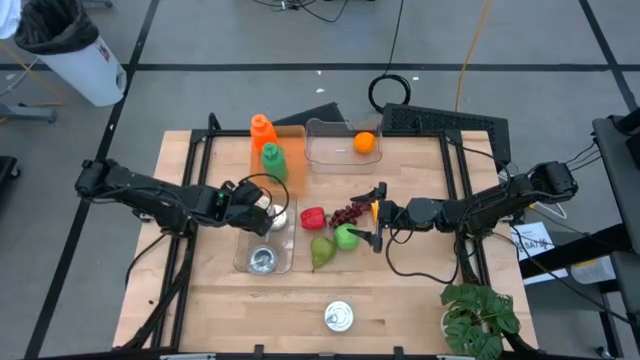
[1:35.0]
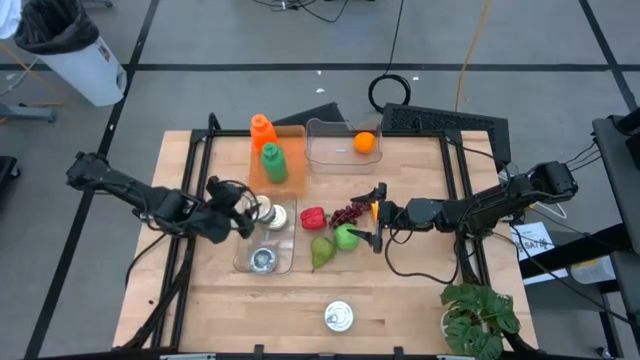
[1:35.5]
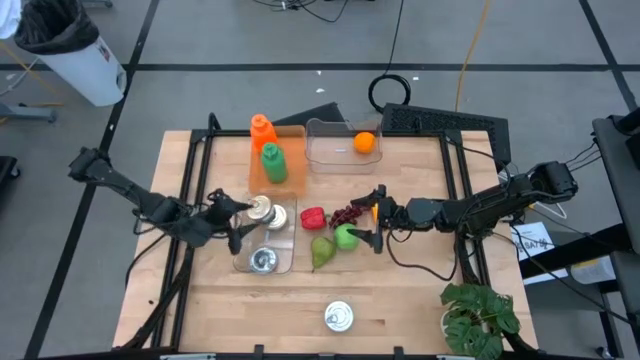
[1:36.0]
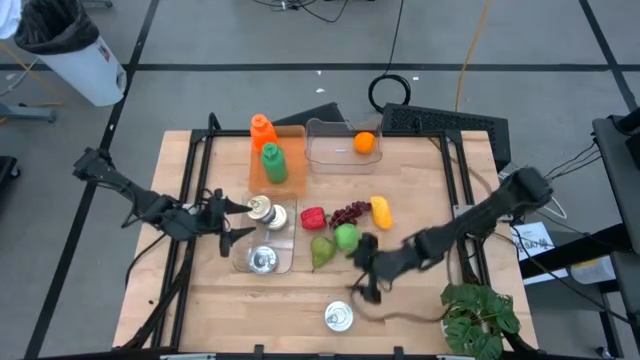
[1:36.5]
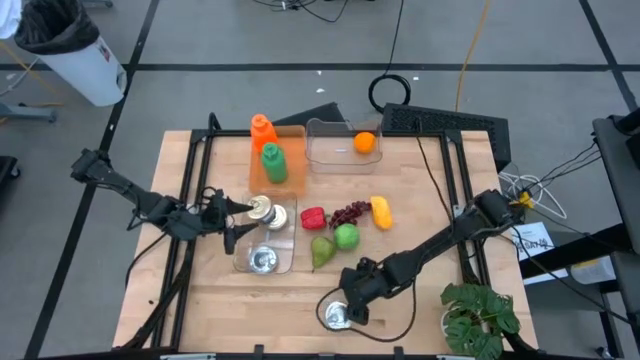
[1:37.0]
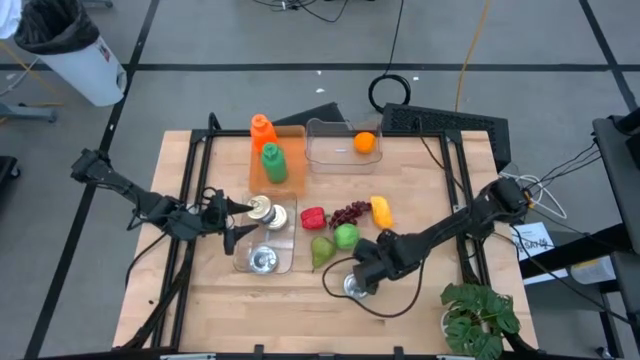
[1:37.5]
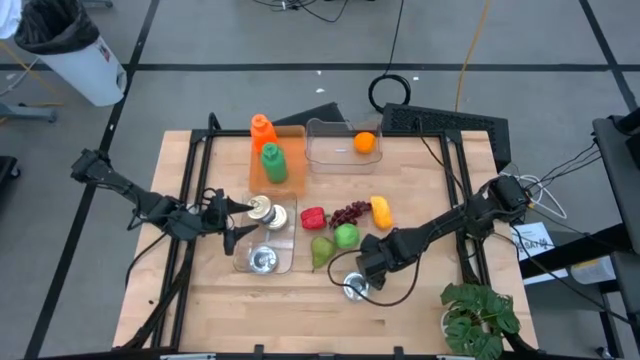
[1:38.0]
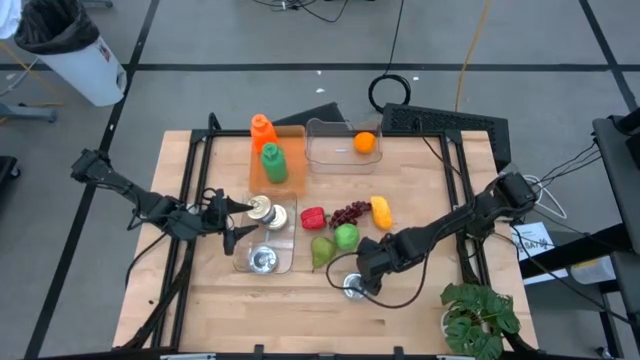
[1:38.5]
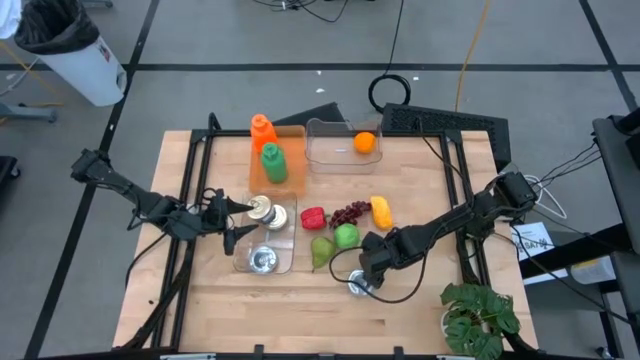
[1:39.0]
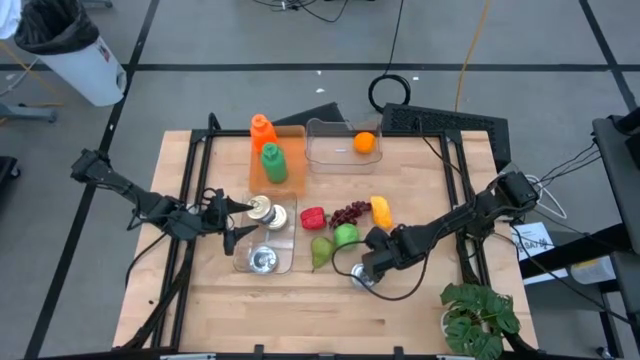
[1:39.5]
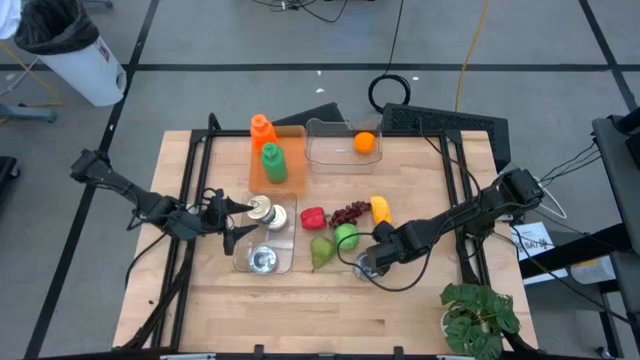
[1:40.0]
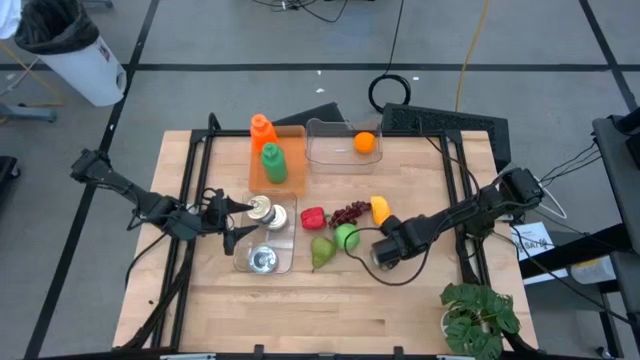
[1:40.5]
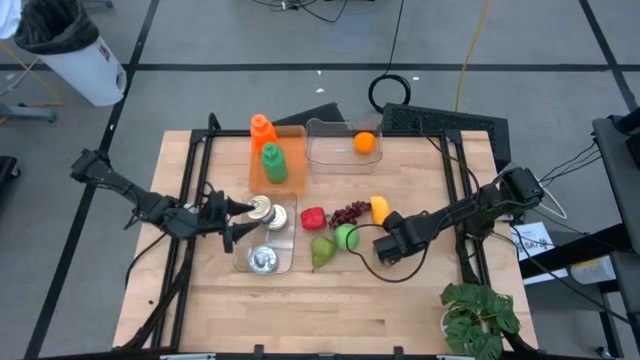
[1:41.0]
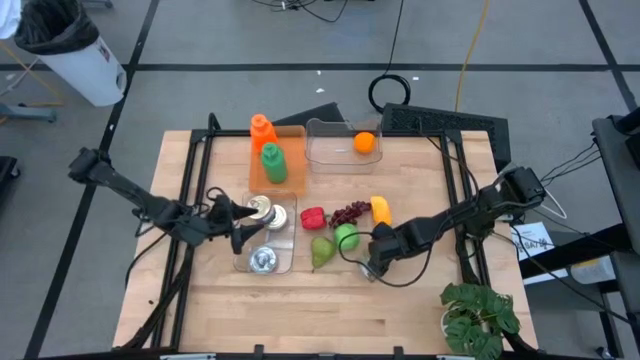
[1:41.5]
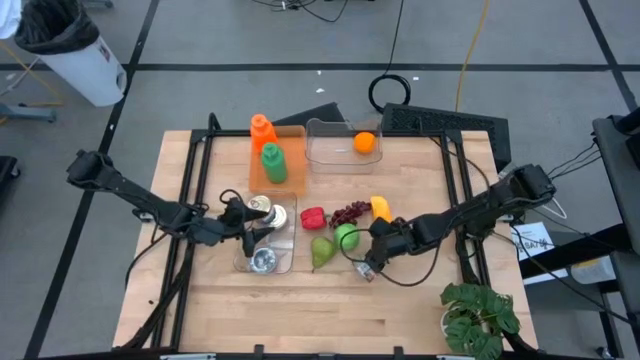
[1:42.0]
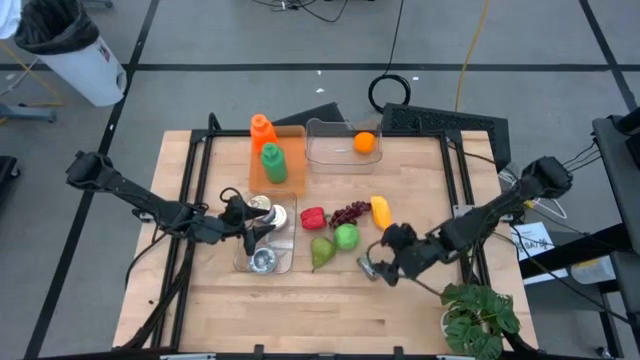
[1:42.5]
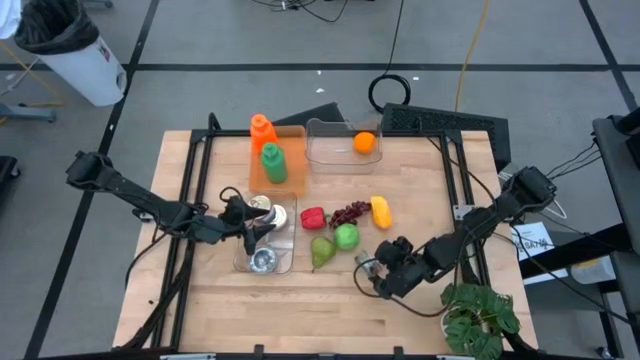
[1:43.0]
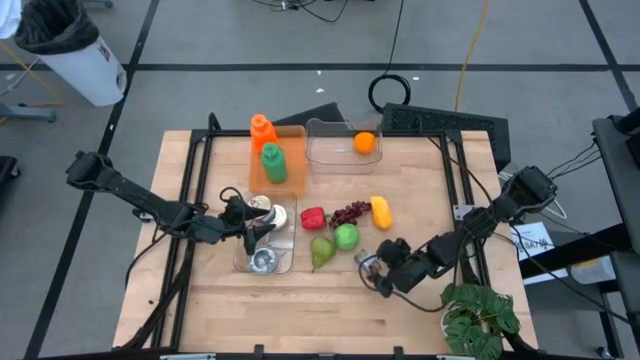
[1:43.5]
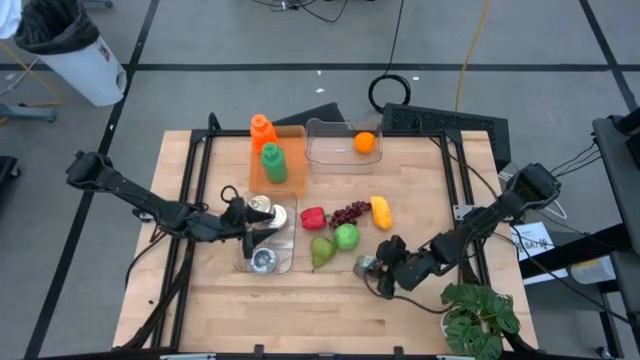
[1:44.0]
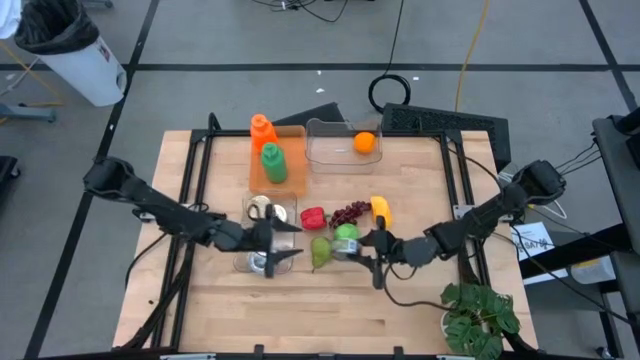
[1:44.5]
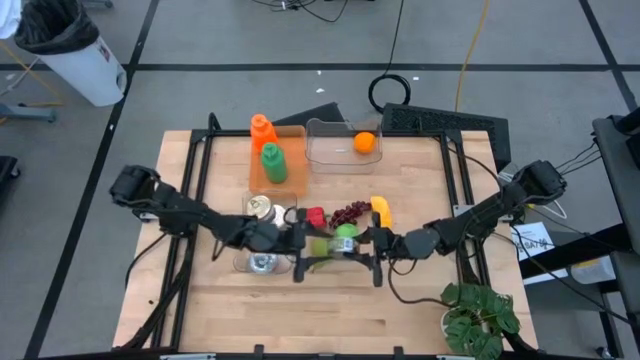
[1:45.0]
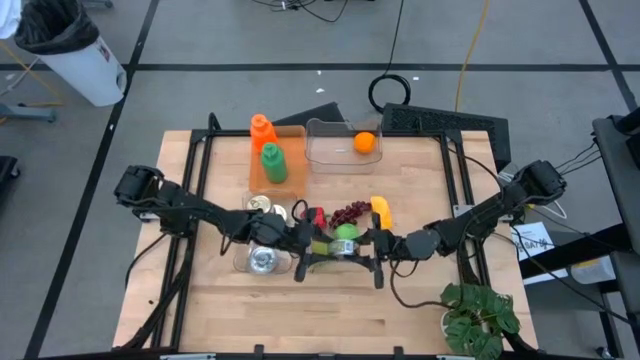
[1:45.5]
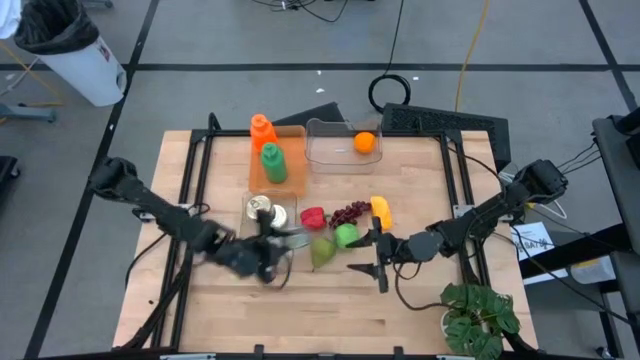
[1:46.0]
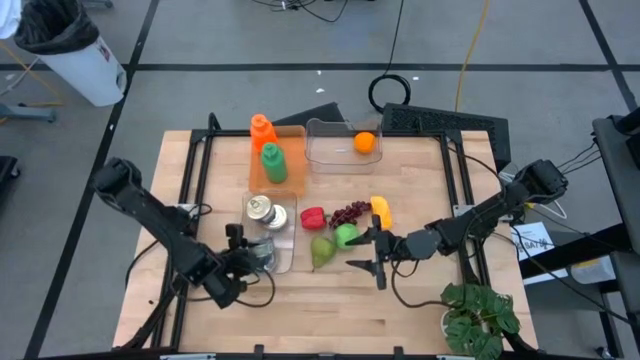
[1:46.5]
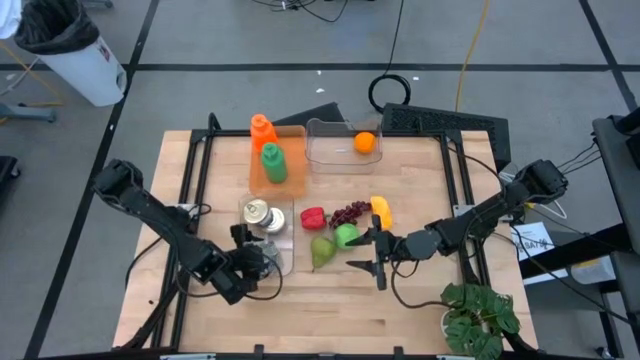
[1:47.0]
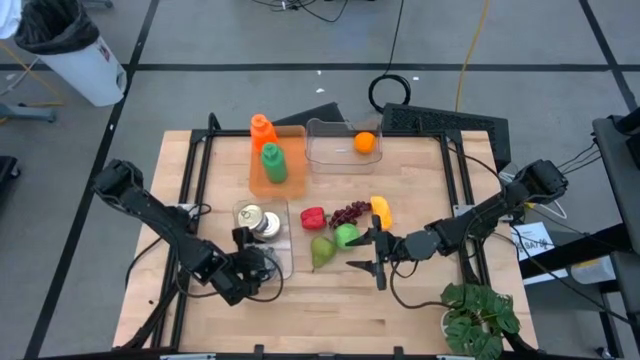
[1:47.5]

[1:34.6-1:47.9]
Task: Pick & Place Food Item
Put the green tuna can into the bottom transparent bin

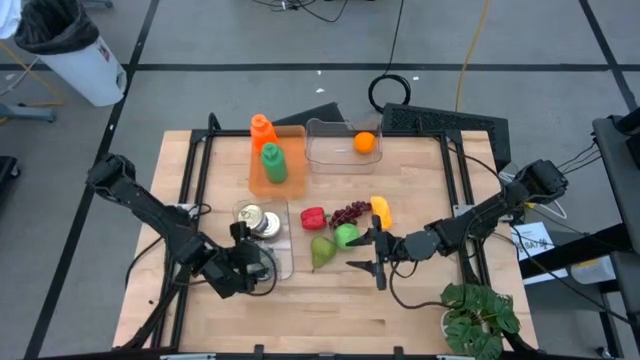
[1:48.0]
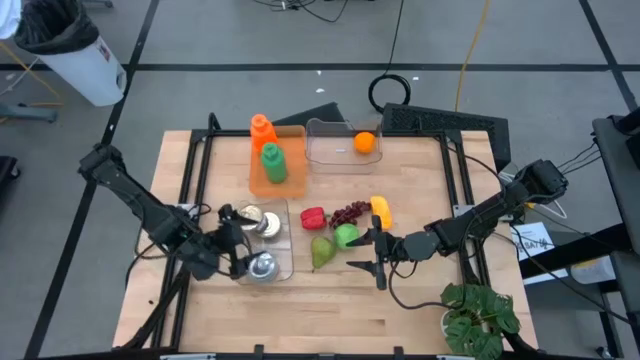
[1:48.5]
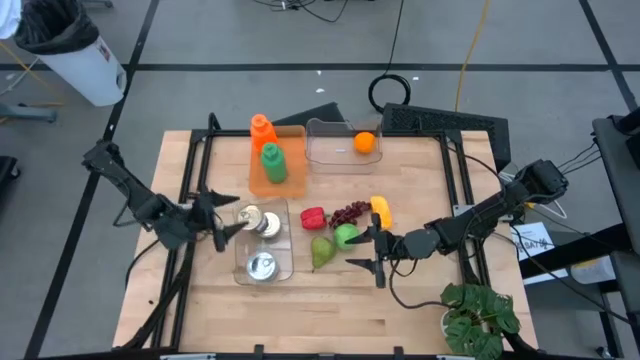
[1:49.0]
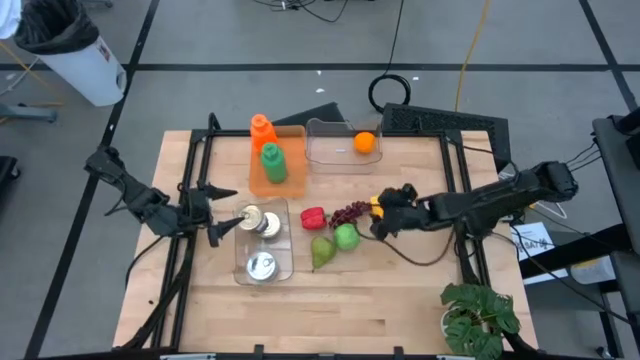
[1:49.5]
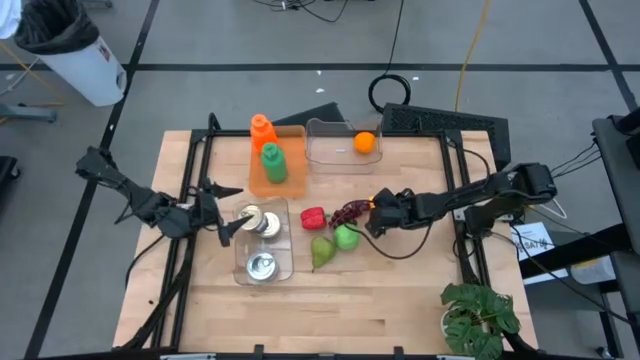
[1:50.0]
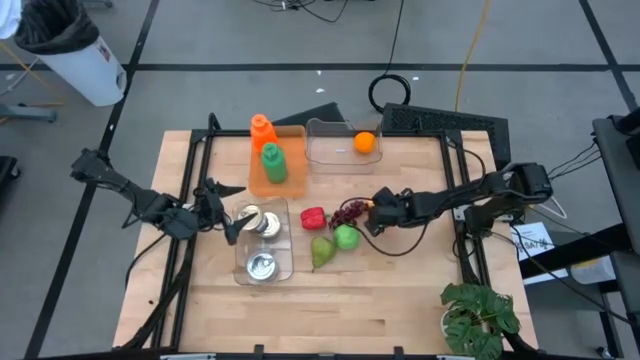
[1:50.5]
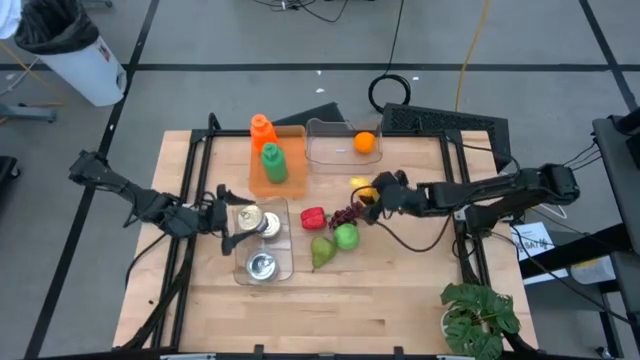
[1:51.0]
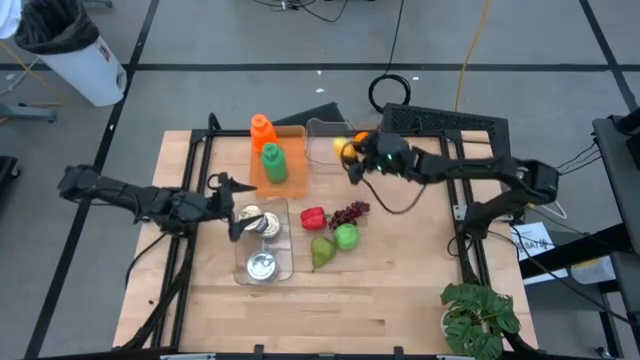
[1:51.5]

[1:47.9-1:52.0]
Put the yellow mango into the top transparent bin

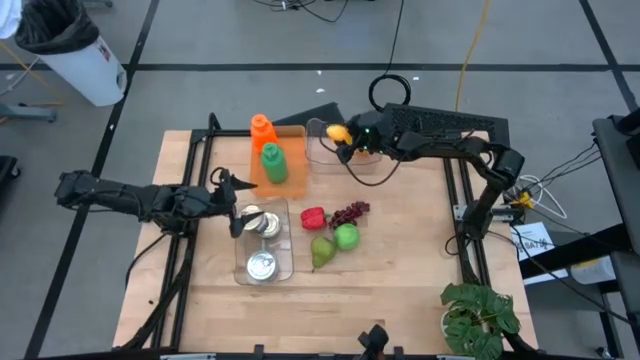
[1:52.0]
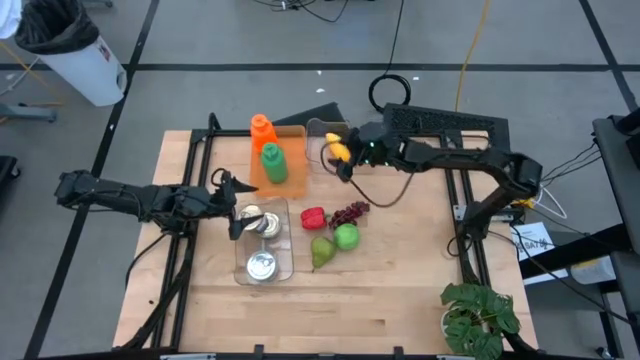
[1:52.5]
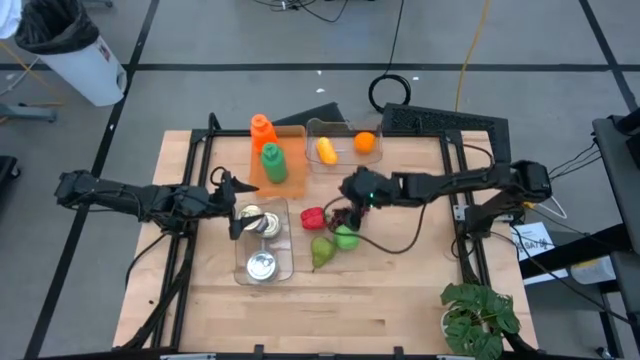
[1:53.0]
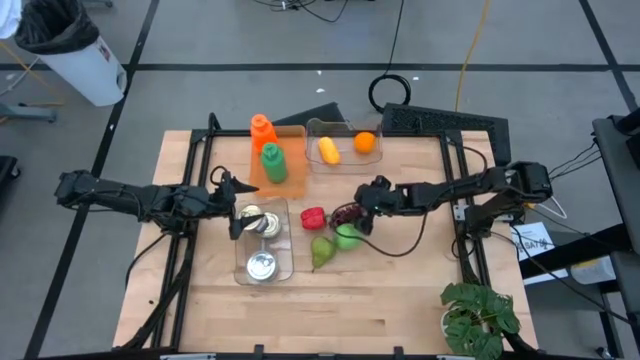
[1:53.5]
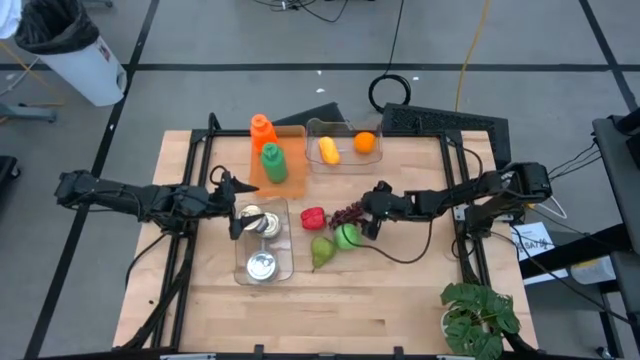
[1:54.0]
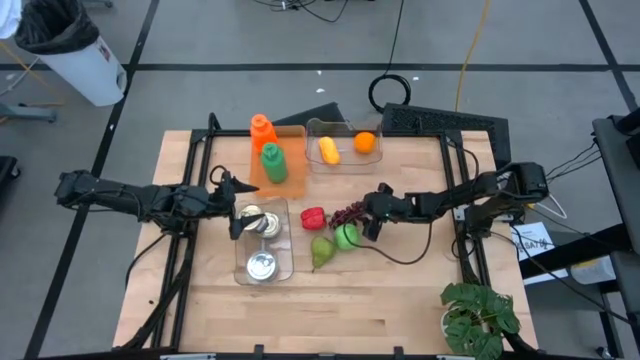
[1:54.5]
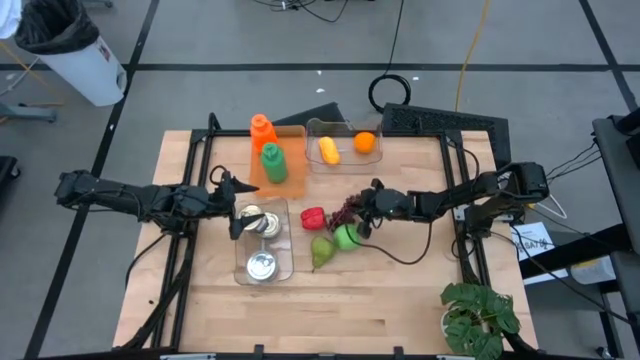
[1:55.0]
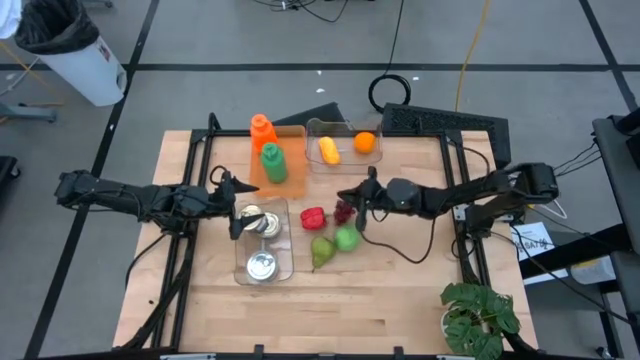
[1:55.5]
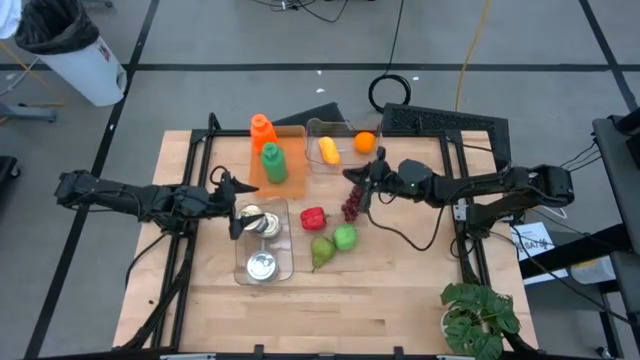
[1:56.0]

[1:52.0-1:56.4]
Put the red grapes into the top transparent bin

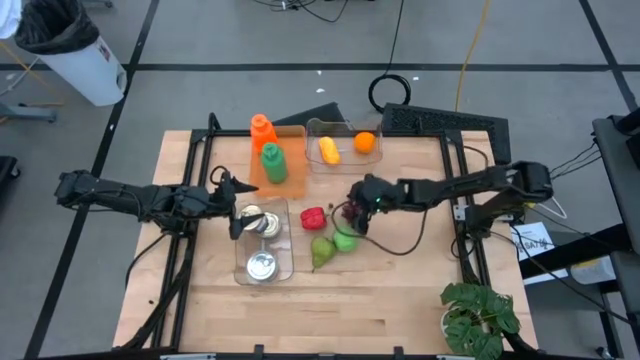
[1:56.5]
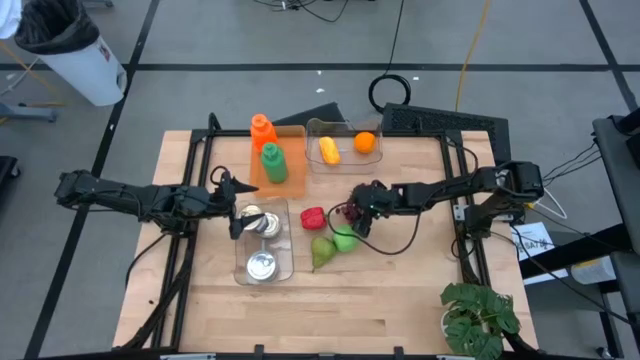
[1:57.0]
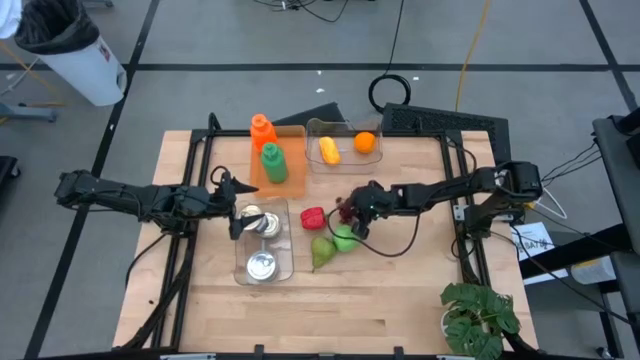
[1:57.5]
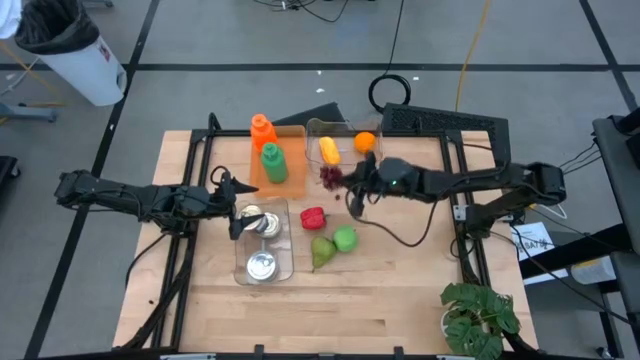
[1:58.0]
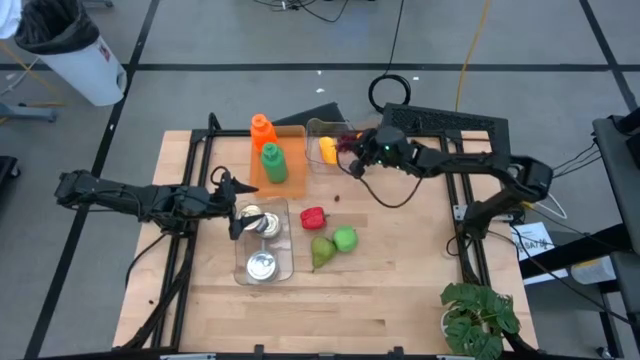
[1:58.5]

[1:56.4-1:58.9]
Put the red grapes into the top transparent bin
